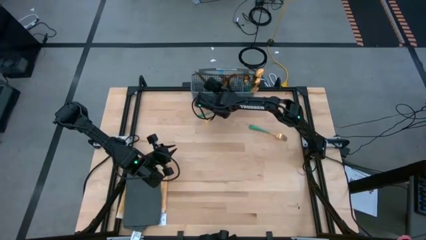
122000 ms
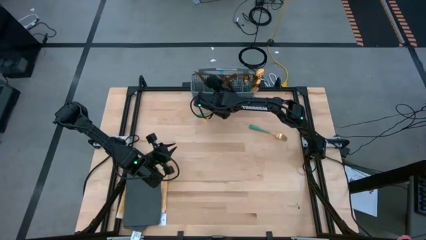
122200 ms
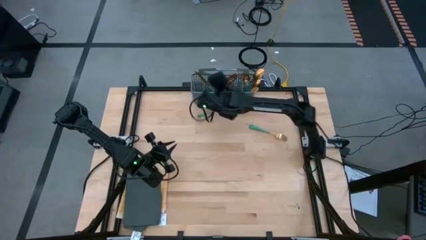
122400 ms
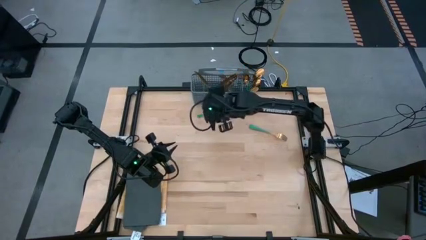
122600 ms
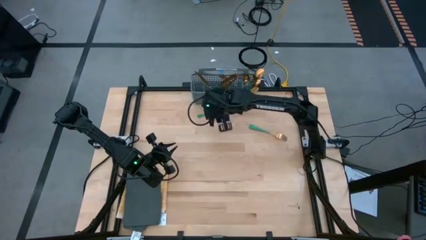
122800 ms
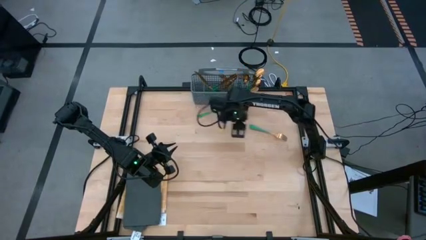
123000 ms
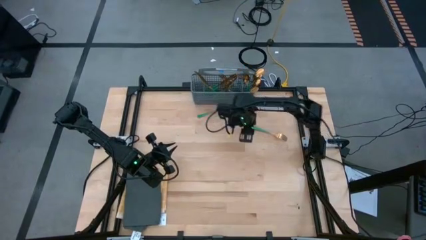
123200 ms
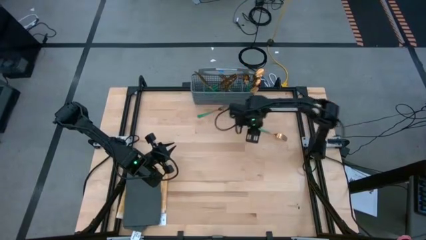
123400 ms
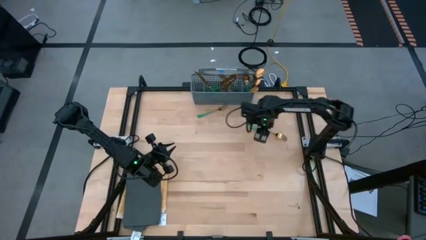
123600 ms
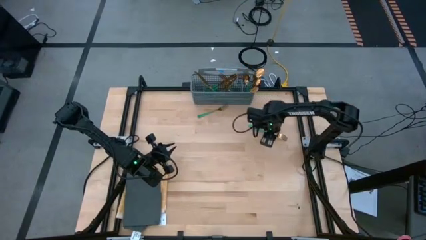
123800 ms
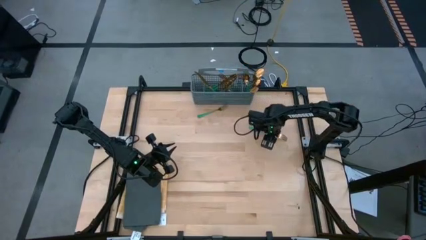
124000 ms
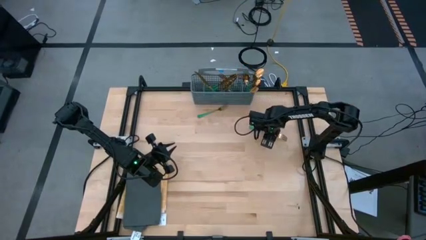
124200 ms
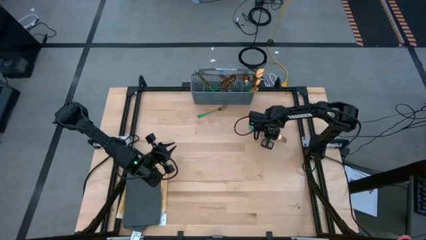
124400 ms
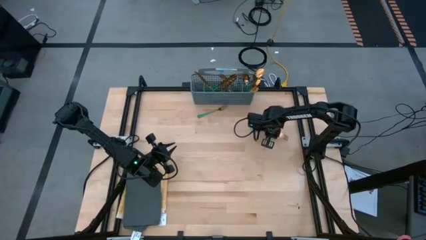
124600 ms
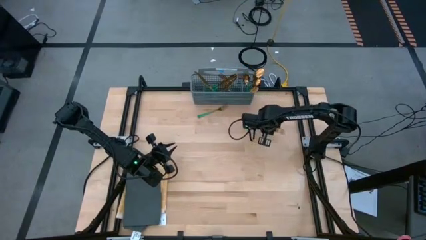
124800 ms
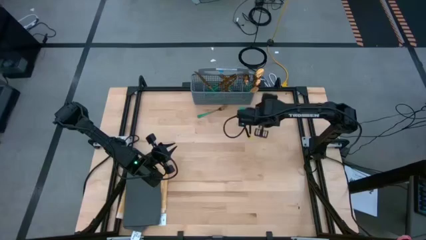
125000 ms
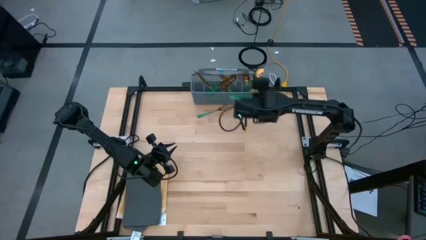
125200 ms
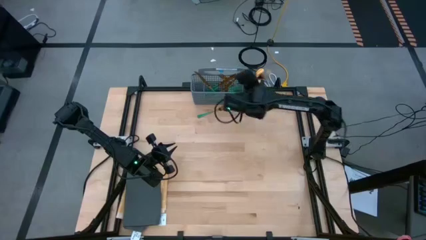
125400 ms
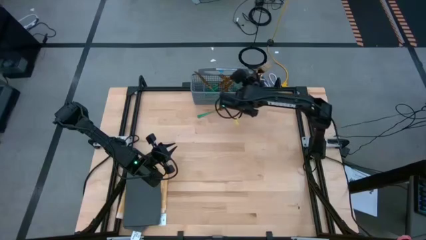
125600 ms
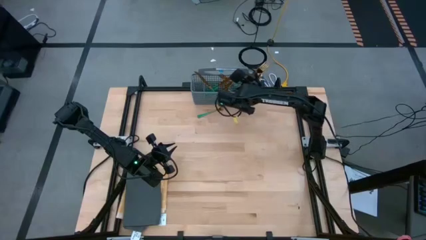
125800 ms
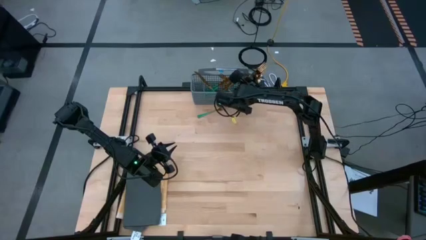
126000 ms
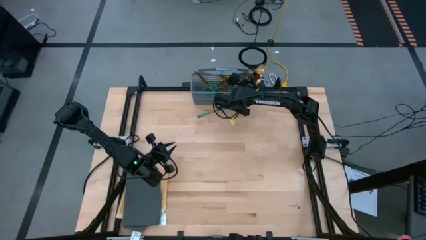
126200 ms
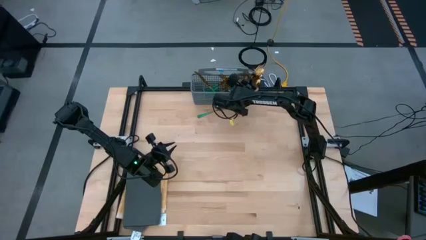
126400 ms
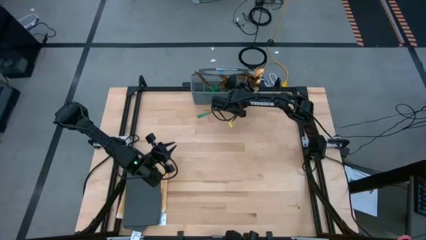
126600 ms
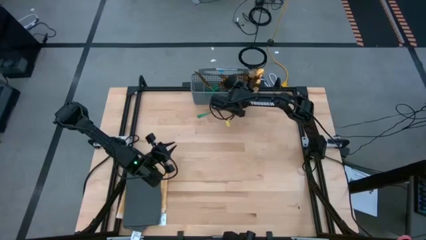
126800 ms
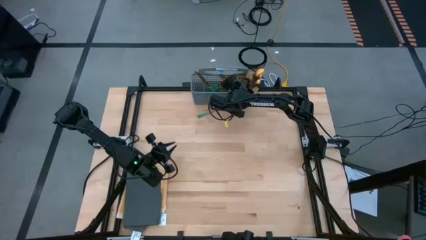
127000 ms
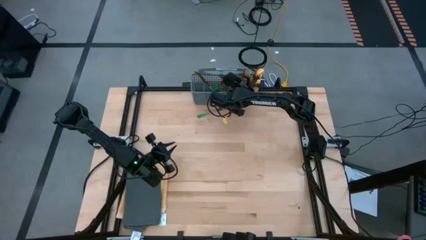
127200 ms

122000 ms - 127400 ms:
Task: Sort silverware
Put the green fork into the dishwasher utensil holder

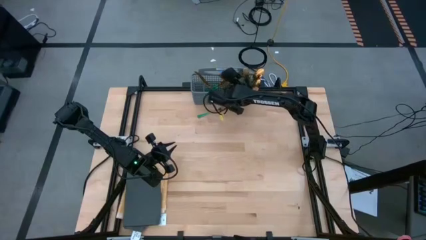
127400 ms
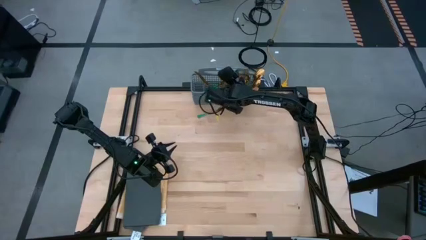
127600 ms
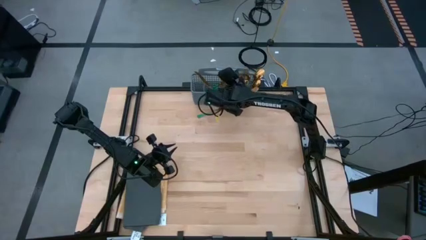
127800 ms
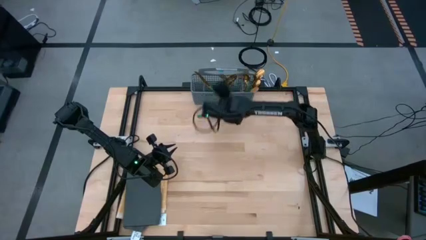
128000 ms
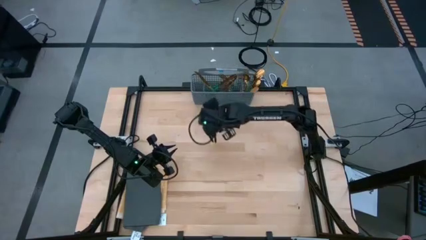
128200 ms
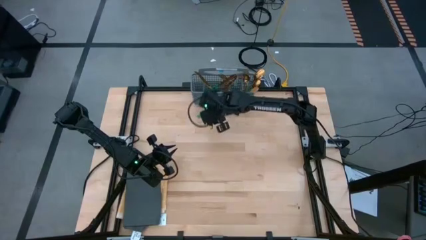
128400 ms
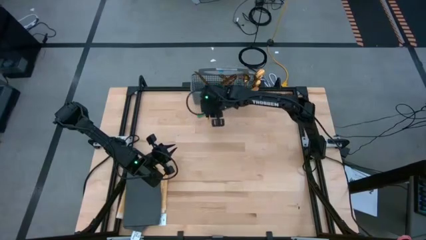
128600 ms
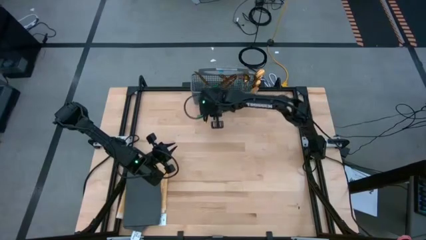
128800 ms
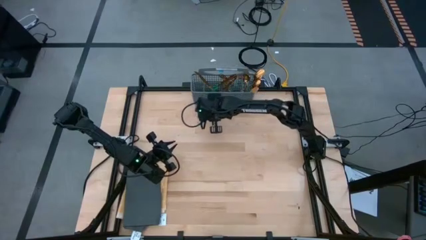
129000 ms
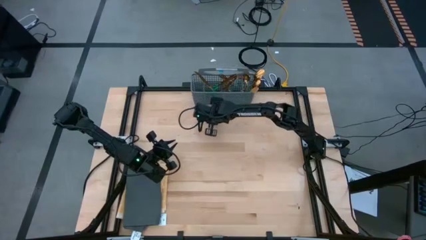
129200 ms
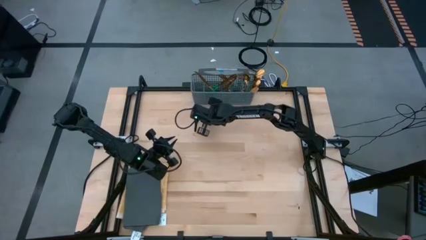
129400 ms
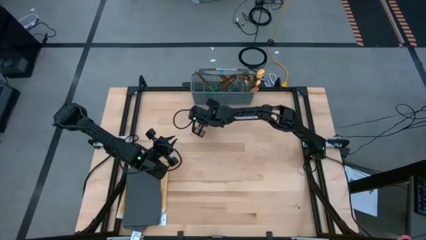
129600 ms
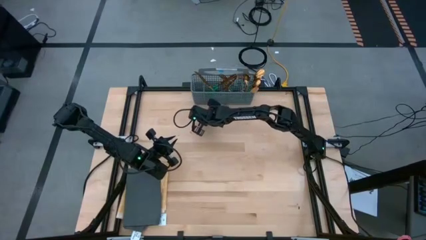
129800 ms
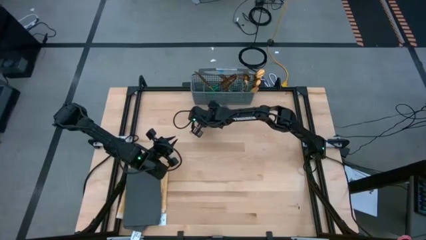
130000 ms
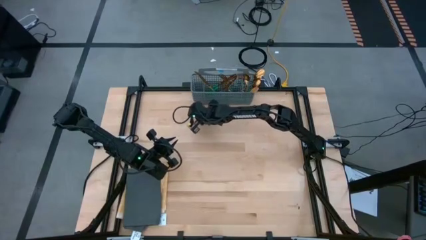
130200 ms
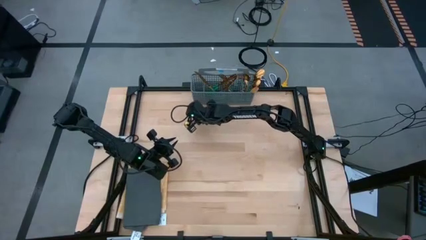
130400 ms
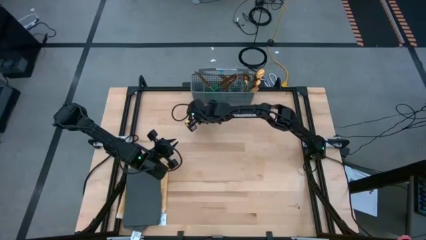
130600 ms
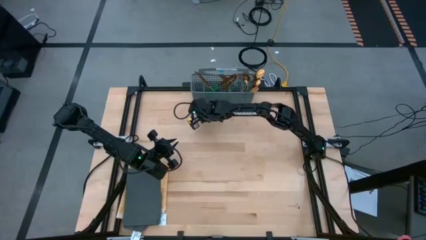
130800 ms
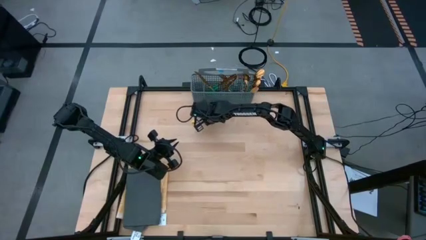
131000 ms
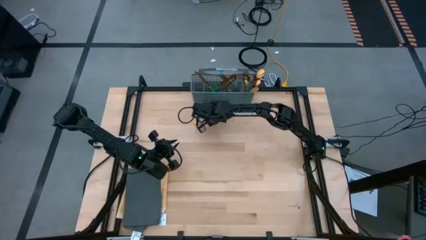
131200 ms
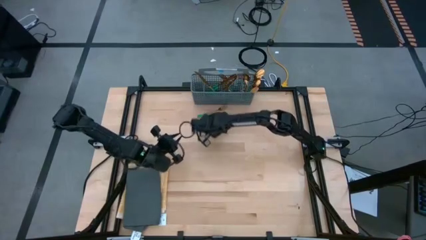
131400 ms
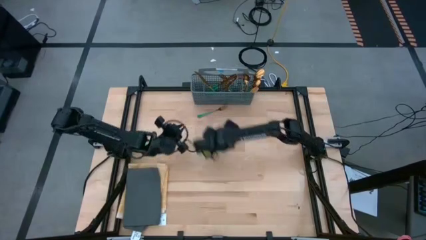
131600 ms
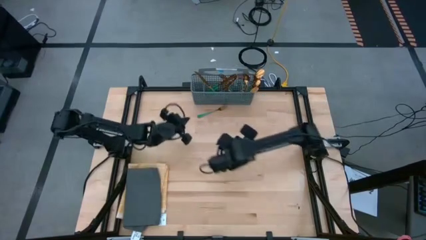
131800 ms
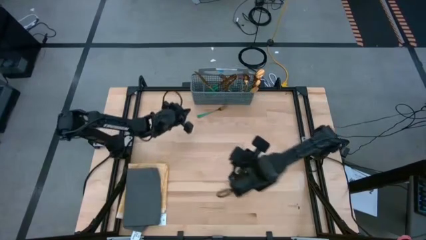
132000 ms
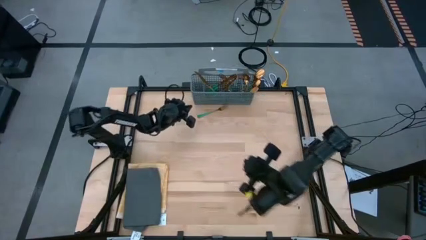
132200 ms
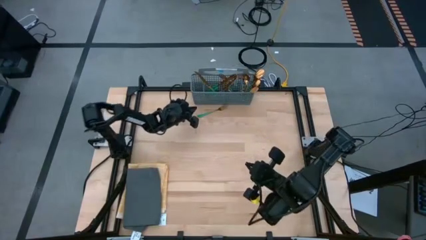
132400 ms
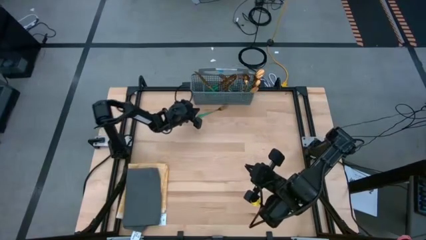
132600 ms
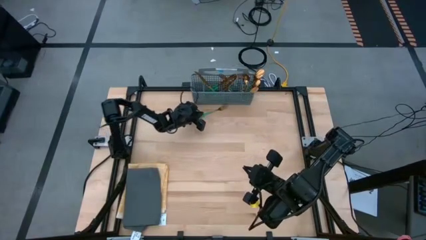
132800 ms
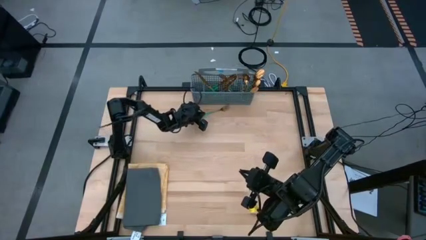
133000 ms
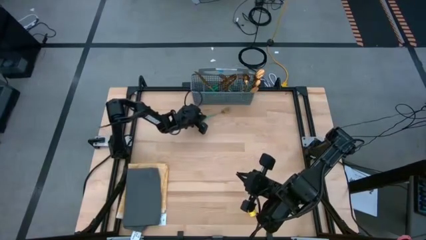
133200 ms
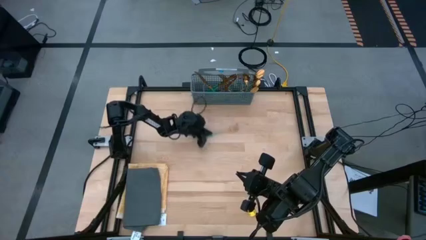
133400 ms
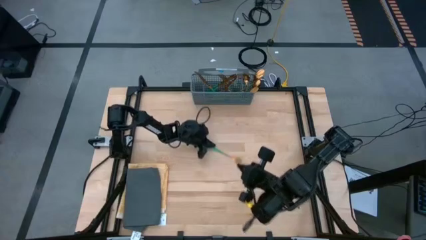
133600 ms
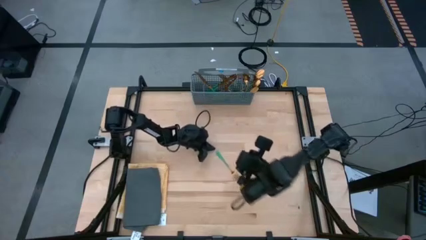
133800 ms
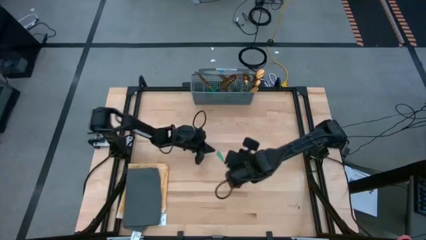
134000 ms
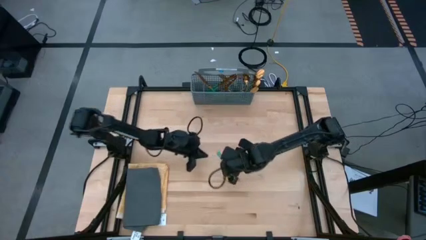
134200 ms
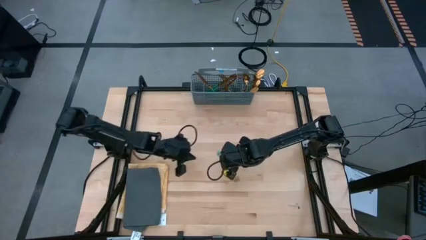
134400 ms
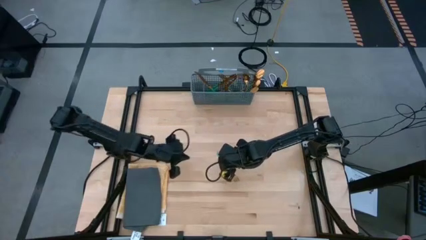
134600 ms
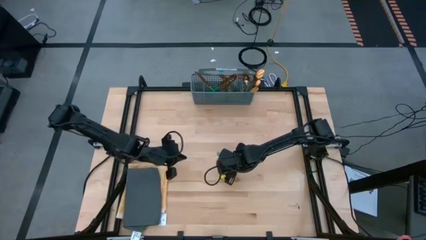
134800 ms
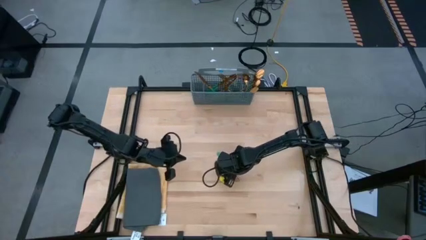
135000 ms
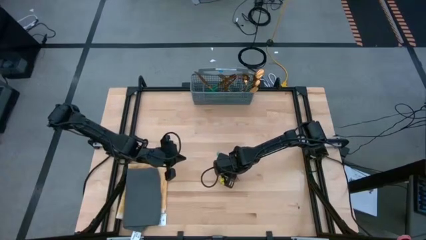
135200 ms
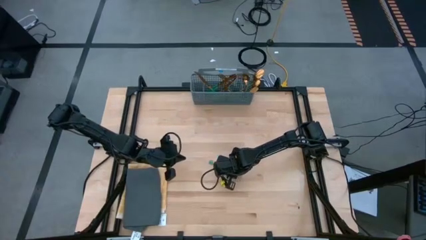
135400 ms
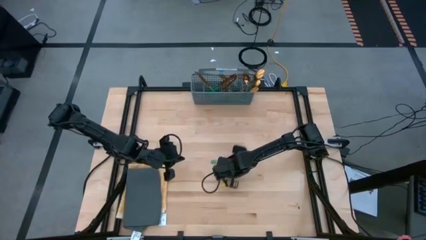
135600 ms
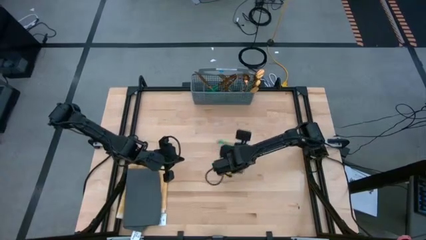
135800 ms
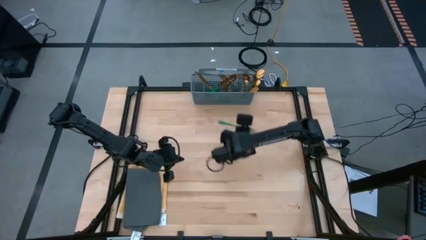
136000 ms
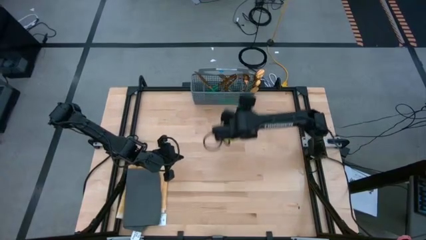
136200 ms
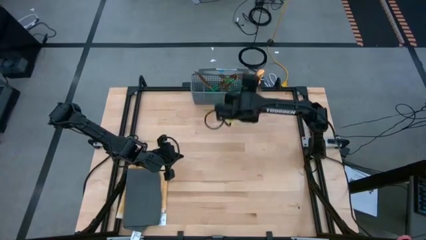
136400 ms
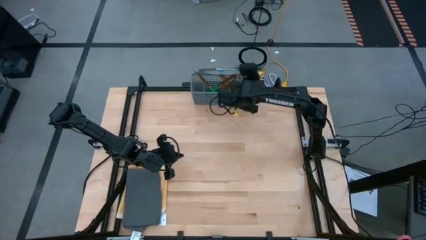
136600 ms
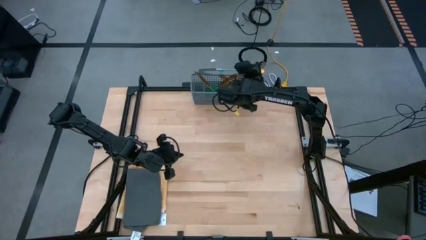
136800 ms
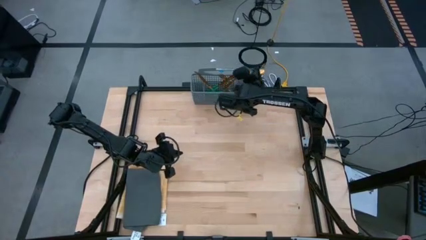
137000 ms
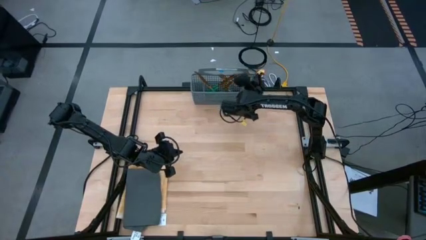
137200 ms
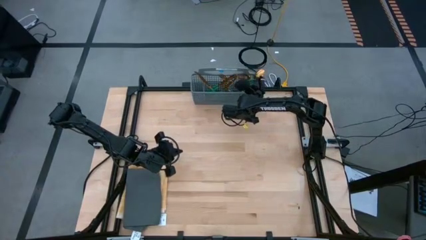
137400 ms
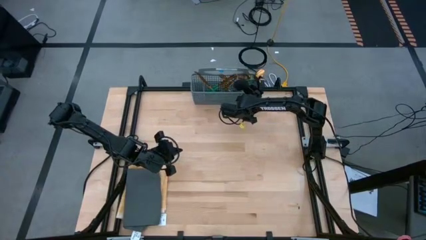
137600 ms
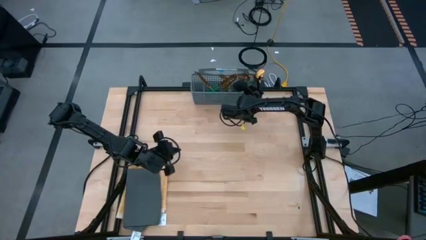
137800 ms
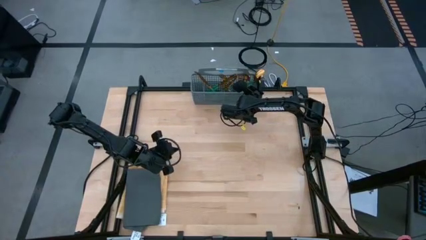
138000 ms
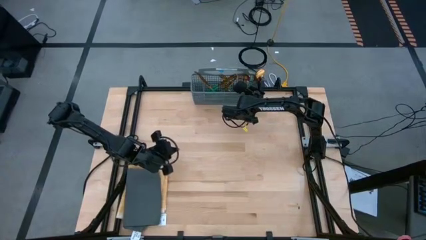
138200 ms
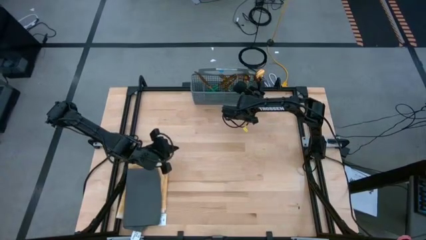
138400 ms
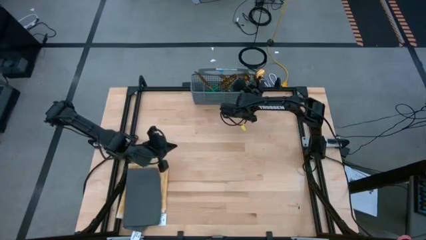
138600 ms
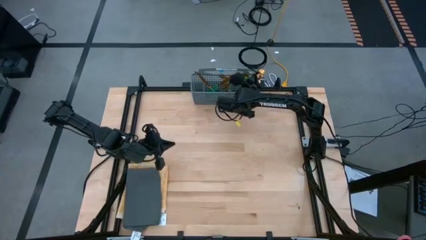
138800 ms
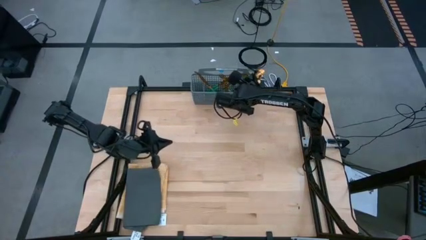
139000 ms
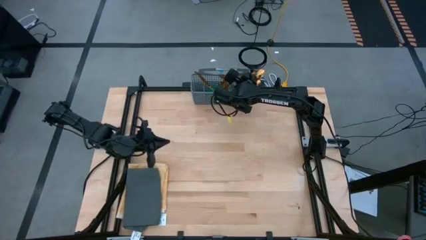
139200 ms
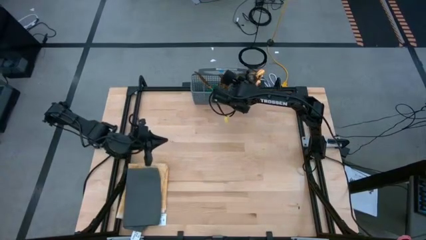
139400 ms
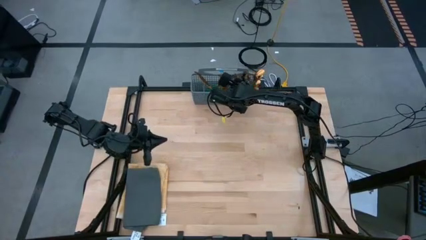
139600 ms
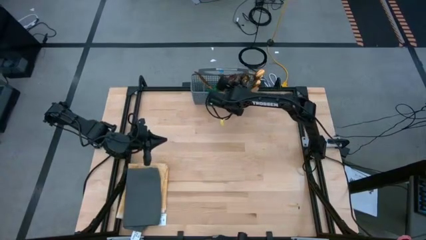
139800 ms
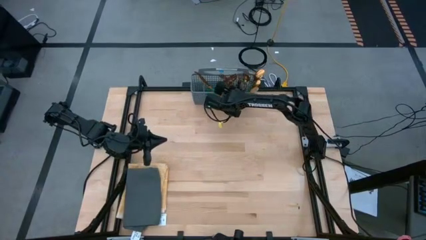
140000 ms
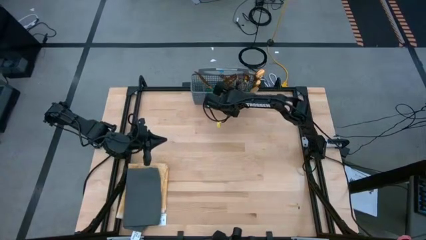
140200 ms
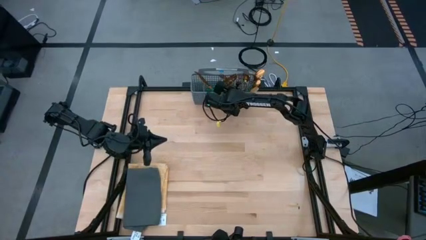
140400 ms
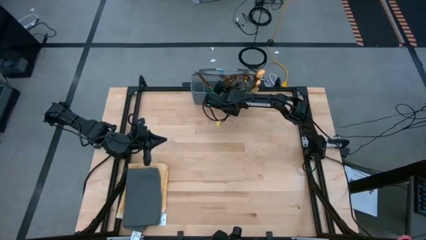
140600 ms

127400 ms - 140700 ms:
Put the green fork into the dishwasher utensil holder
